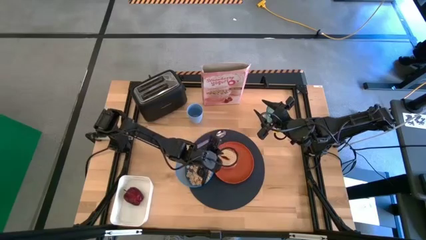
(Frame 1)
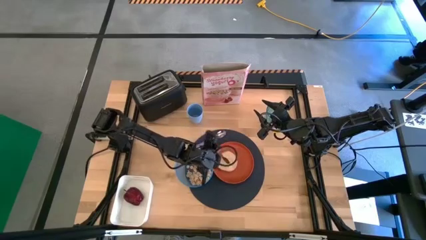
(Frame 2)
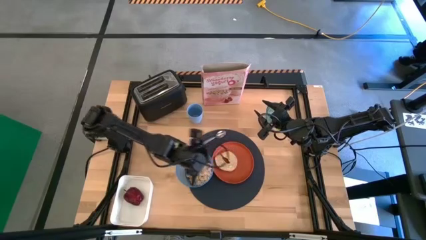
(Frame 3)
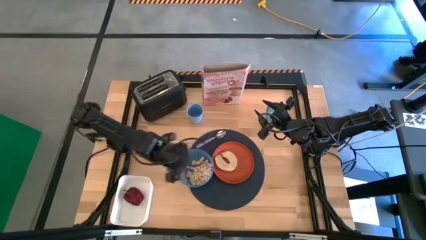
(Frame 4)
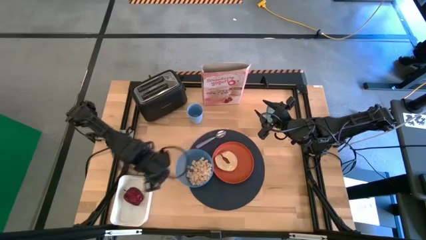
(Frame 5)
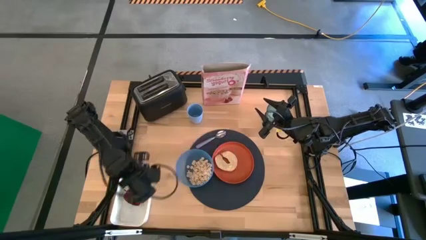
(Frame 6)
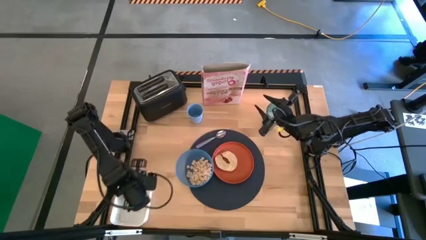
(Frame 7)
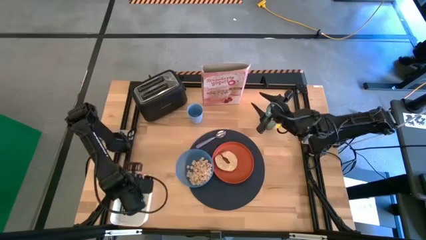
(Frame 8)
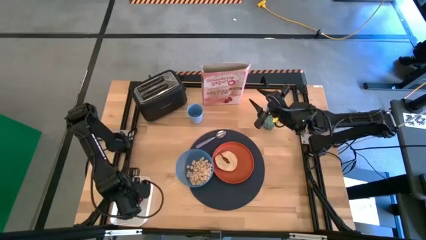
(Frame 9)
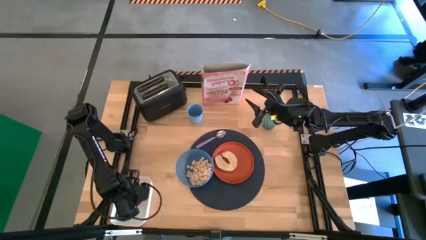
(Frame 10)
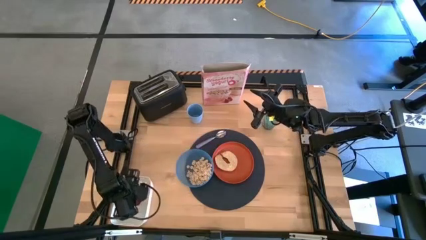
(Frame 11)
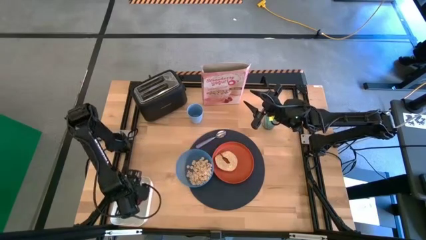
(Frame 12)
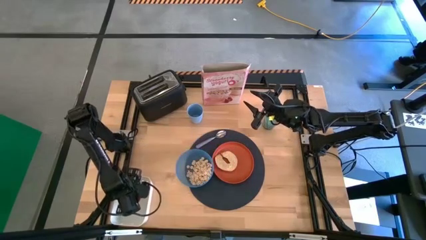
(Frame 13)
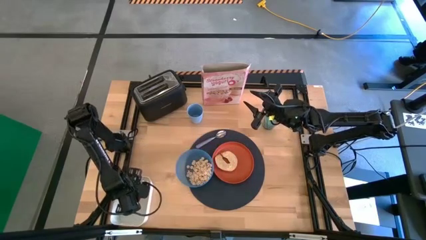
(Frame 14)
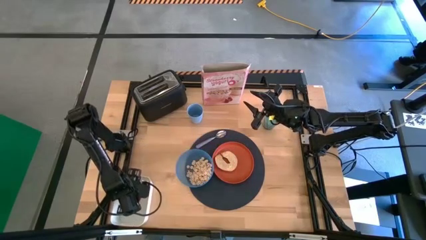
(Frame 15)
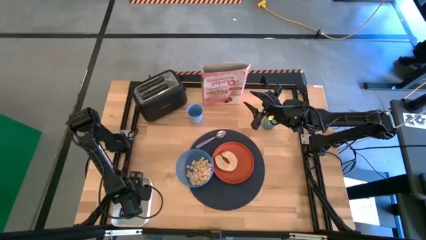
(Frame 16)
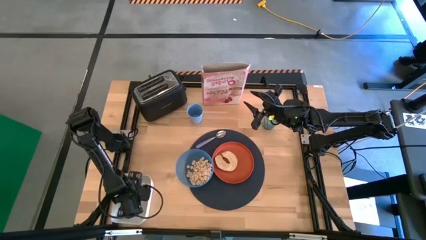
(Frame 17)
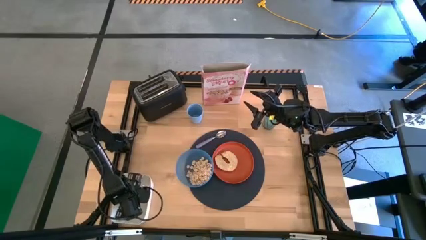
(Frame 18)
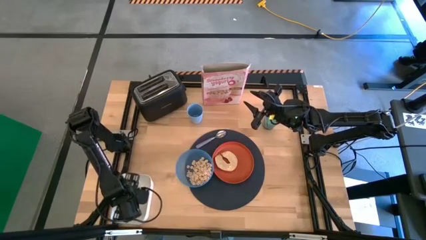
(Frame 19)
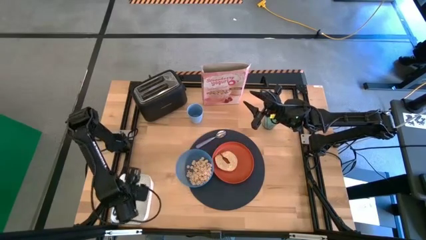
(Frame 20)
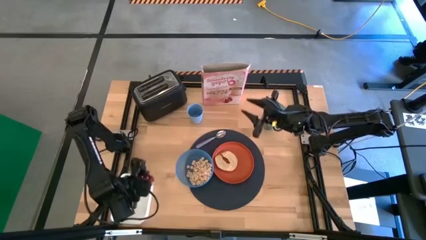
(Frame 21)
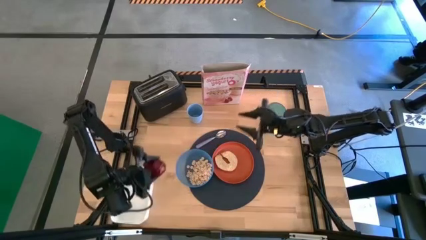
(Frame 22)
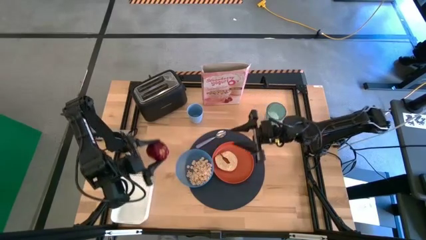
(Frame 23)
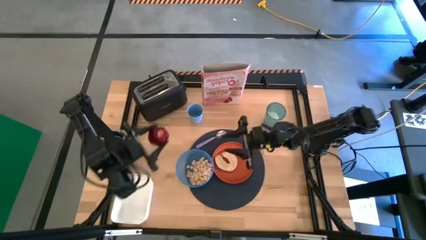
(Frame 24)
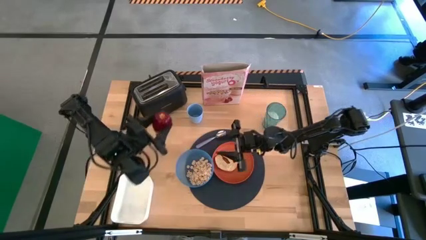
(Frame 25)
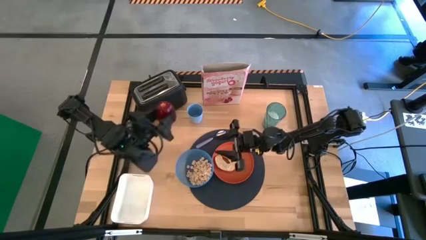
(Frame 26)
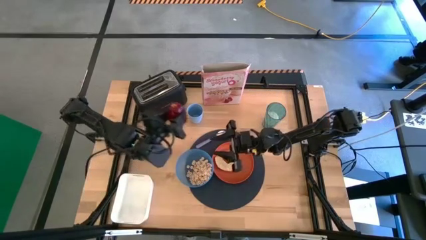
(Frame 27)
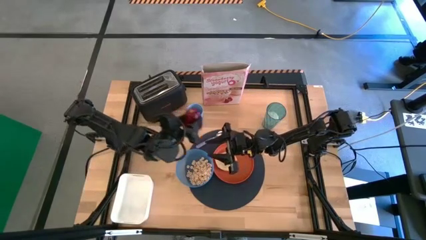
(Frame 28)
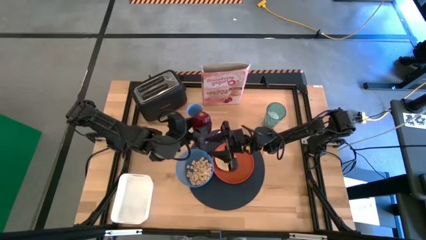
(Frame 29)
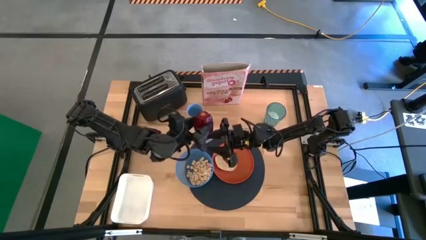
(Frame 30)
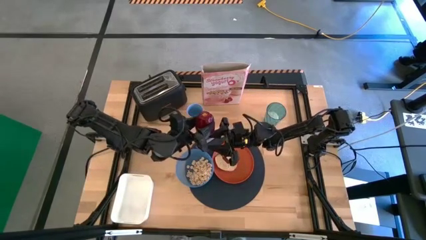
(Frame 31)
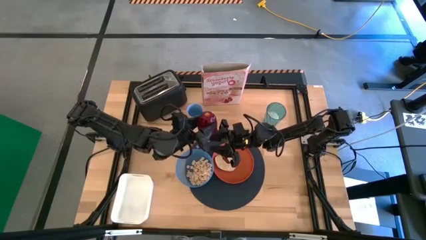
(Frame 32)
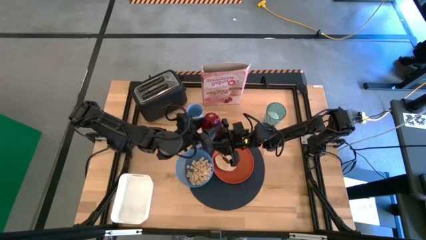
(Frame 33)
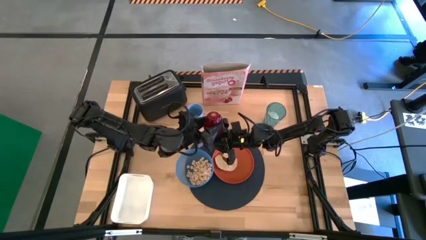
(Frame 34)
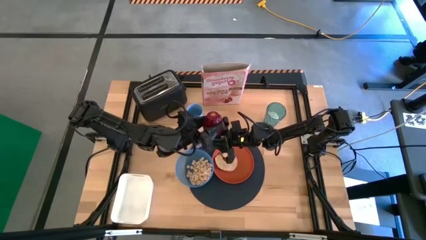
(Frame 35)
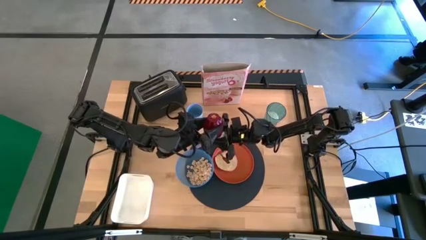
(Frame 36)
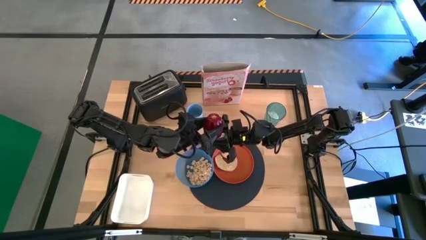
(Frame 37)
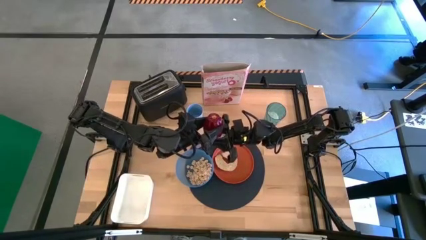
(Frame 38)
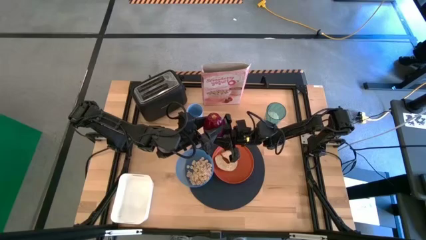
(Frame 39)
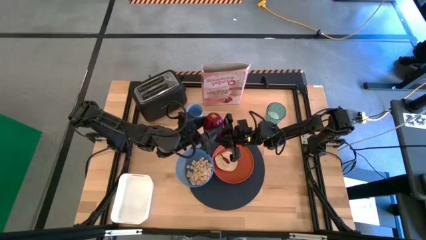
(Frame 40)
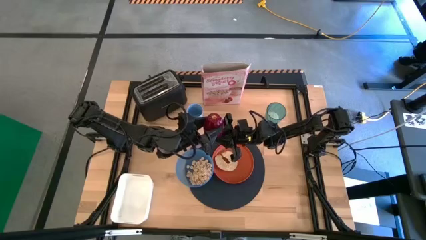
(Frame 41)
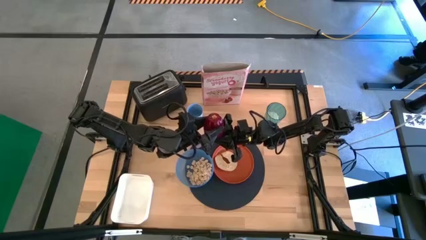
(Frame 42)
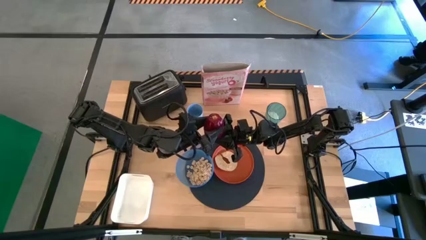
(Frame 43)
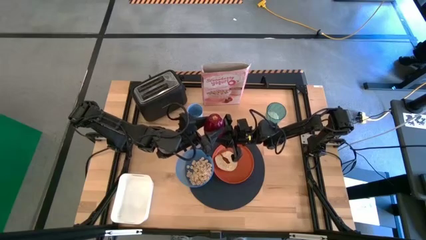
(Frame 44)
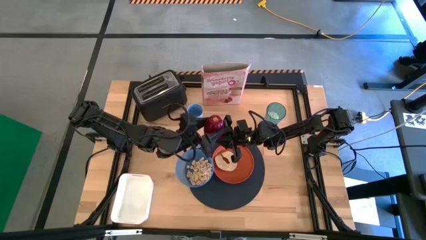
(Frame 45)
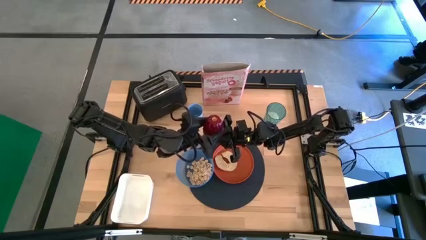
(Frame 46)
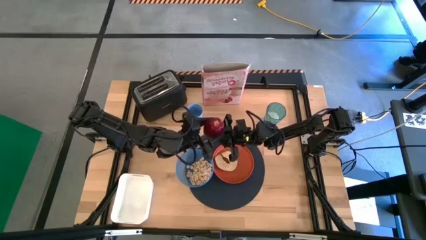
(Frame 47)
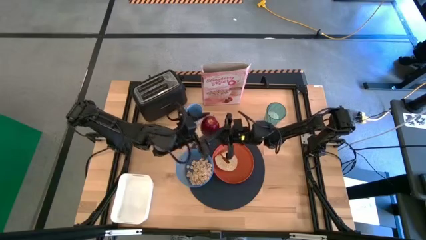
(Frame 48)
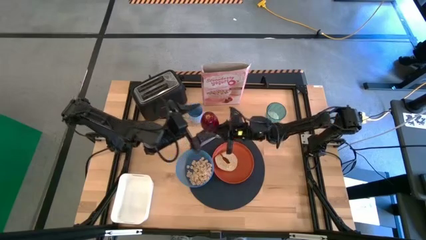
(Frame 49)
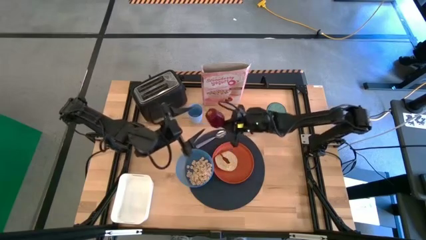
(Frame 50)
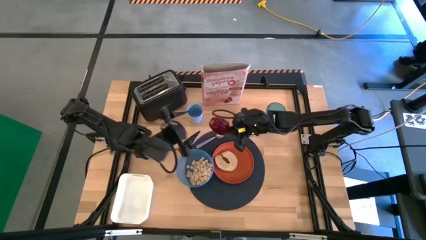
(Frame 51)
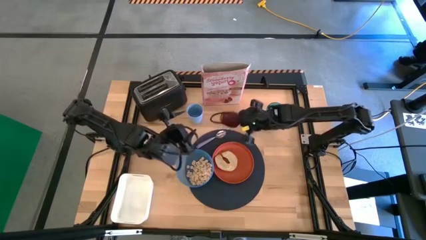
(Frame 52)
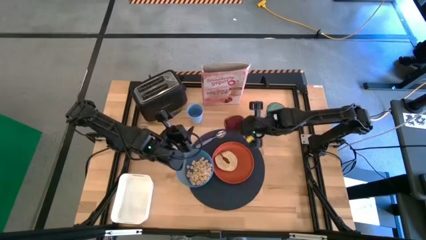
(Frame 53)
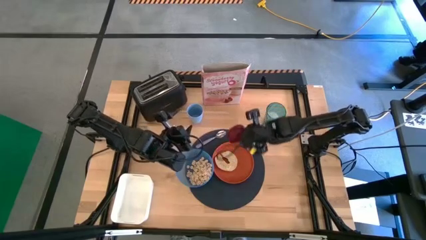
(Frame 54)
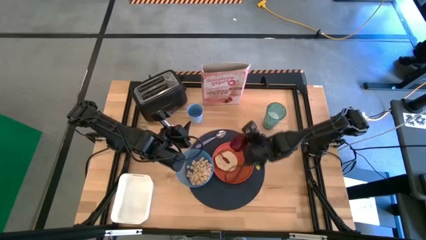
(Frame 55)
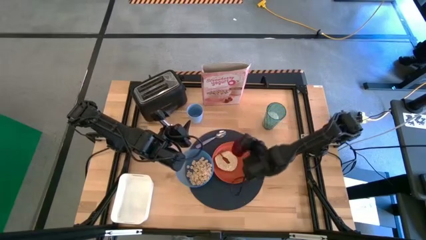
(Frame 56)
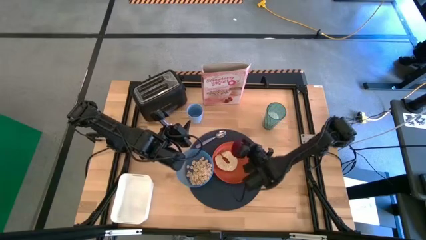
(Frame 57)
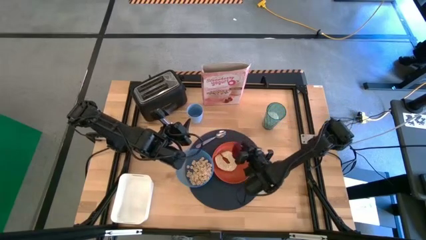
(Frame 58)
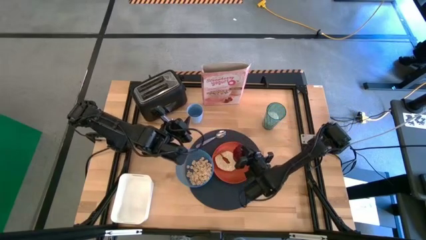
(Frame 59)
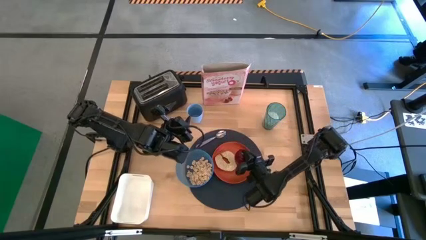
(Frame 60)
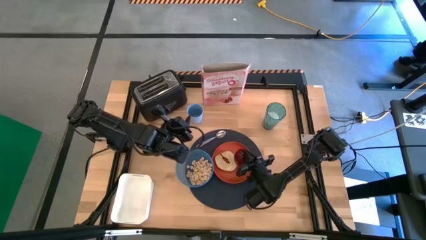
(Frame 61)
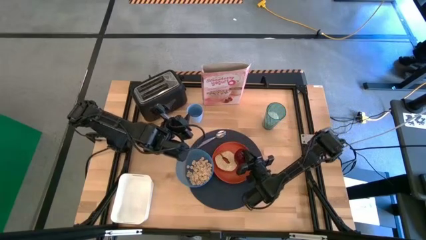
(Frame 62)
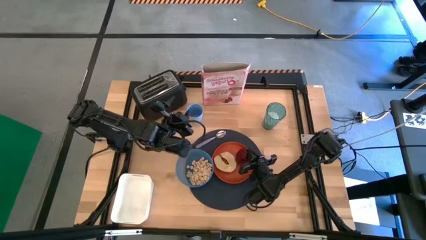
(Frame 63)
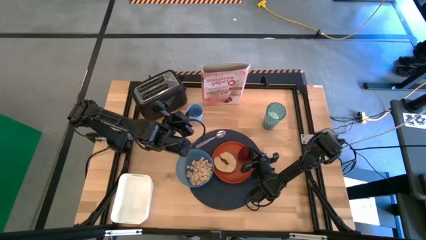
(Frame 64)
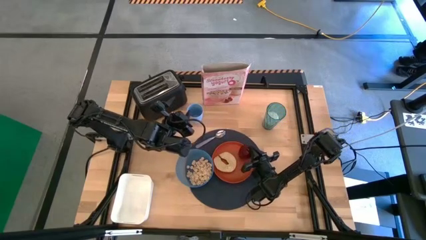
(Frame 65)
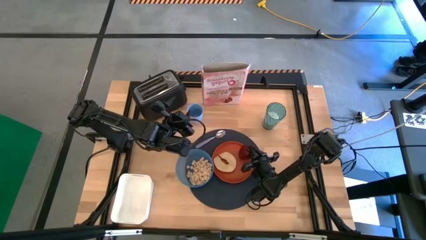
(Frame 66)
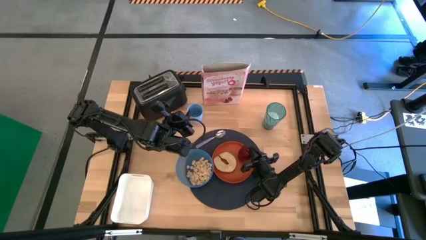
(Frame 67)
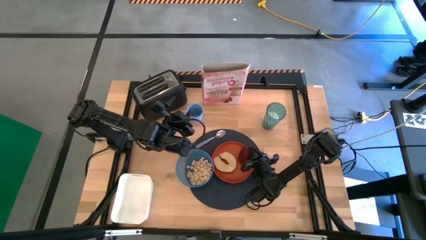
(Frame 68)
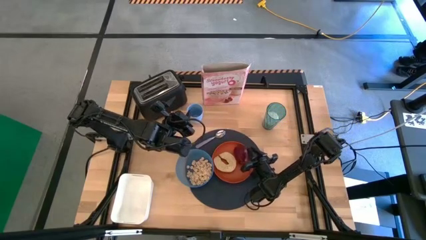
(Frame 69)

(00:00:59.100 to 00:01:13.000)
Task: Arrange a breakfast setting
Put the red apple from the white bin on the orange plate
